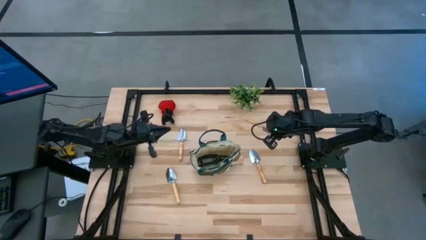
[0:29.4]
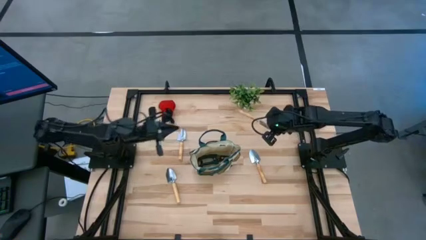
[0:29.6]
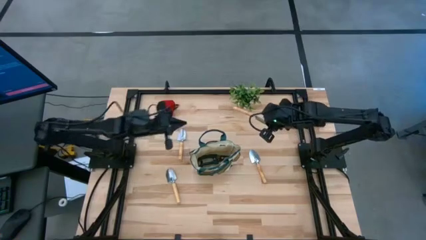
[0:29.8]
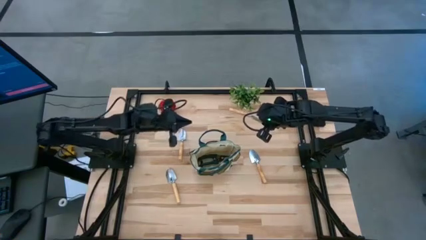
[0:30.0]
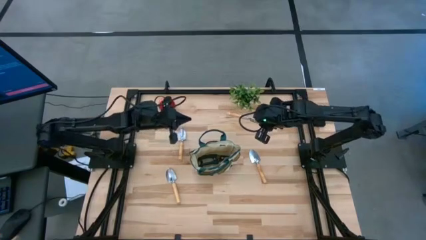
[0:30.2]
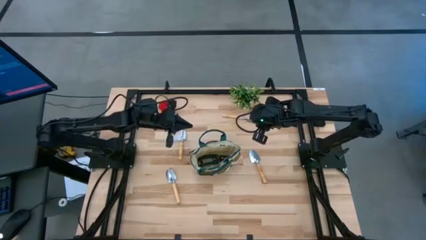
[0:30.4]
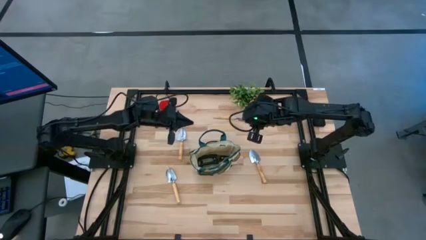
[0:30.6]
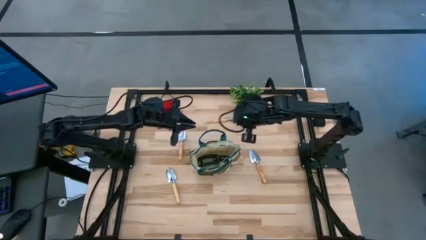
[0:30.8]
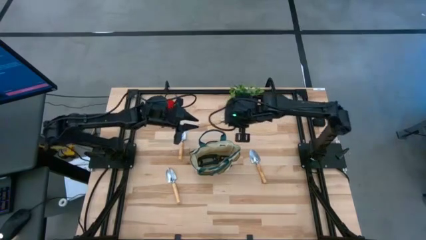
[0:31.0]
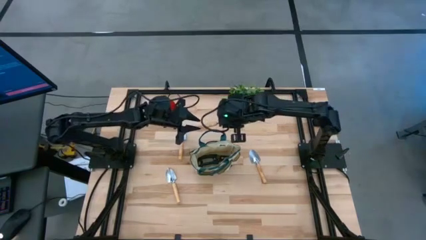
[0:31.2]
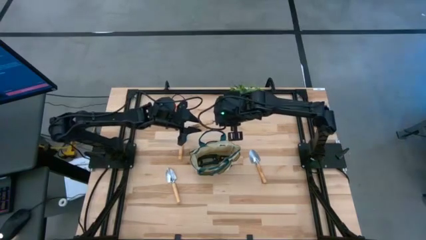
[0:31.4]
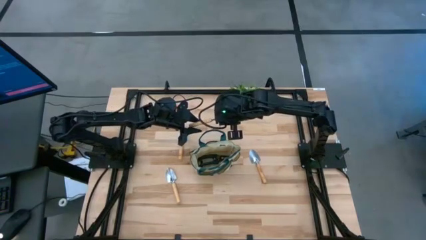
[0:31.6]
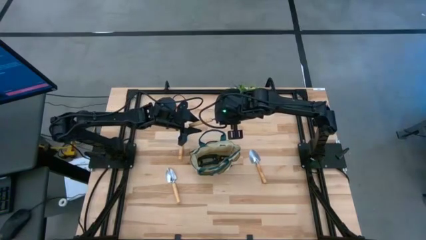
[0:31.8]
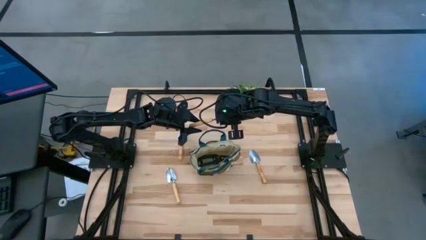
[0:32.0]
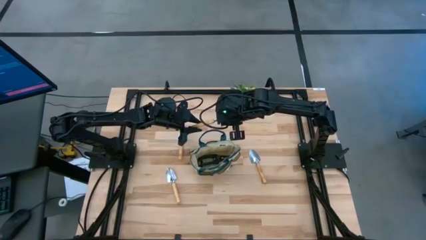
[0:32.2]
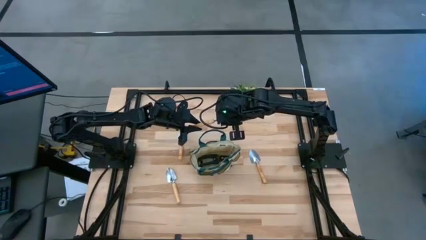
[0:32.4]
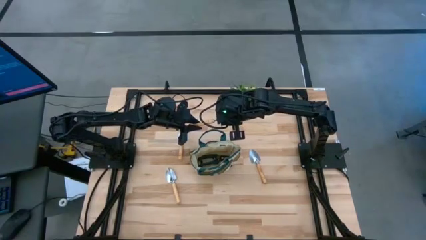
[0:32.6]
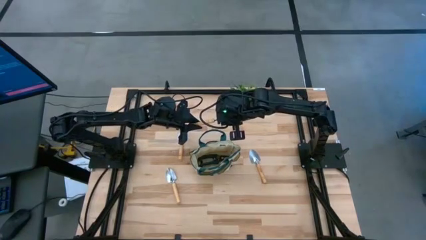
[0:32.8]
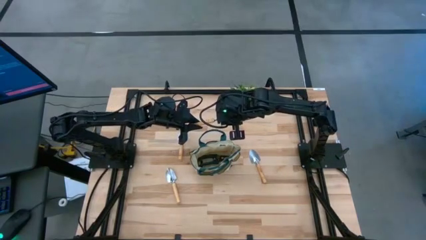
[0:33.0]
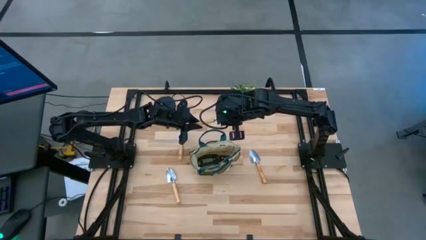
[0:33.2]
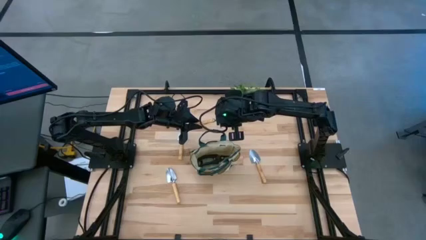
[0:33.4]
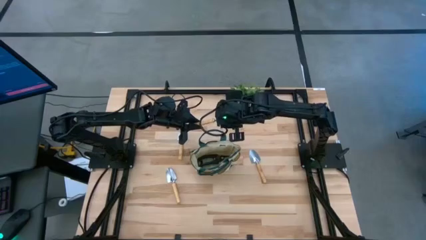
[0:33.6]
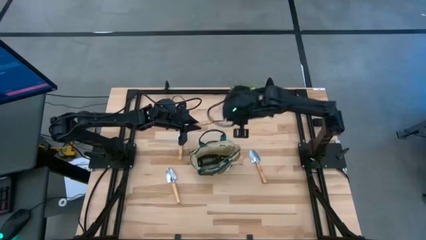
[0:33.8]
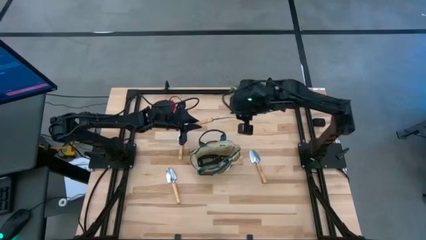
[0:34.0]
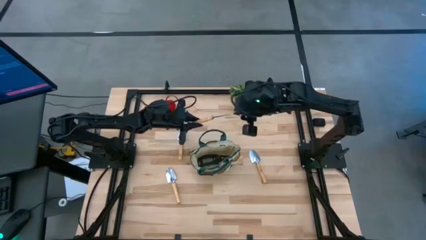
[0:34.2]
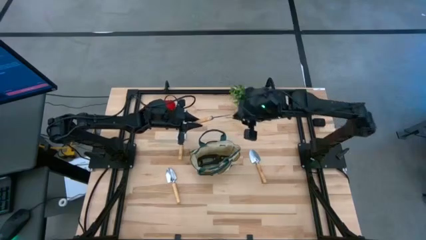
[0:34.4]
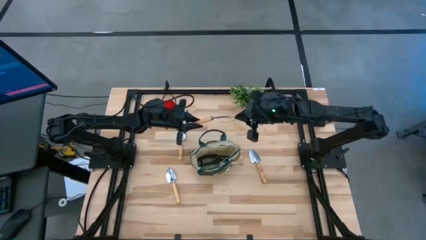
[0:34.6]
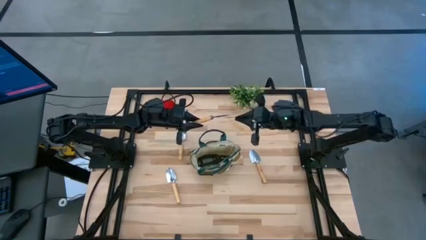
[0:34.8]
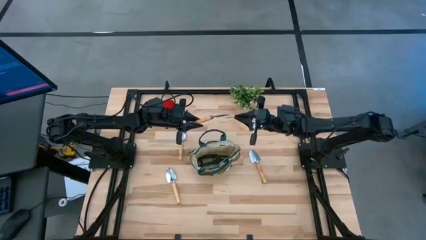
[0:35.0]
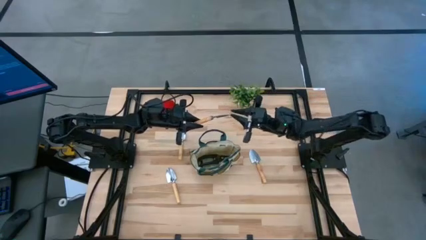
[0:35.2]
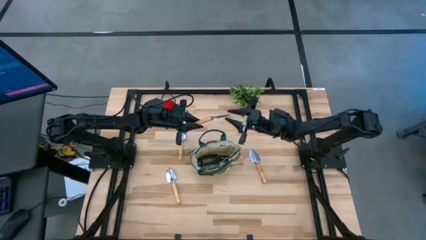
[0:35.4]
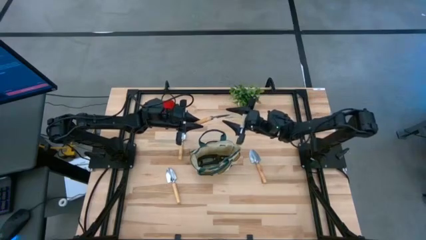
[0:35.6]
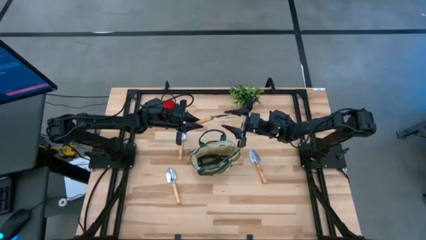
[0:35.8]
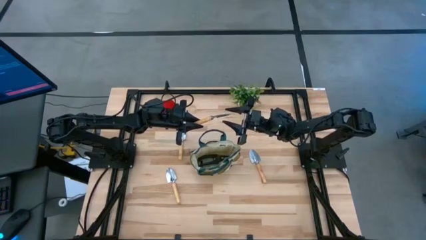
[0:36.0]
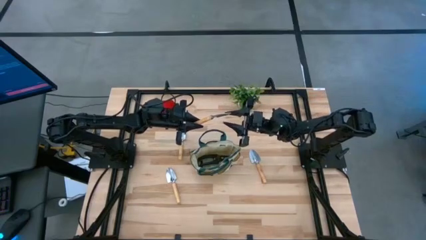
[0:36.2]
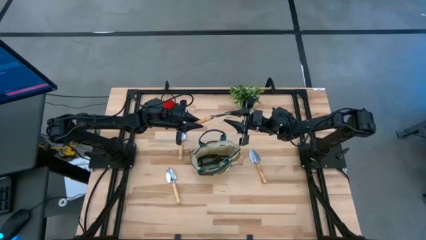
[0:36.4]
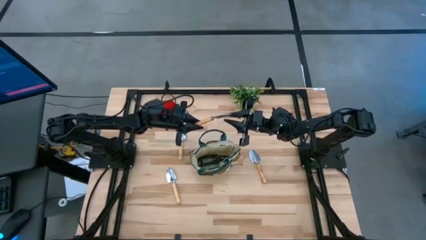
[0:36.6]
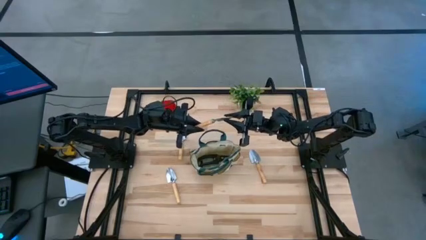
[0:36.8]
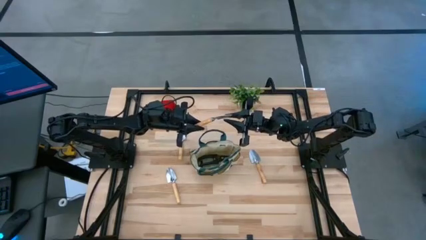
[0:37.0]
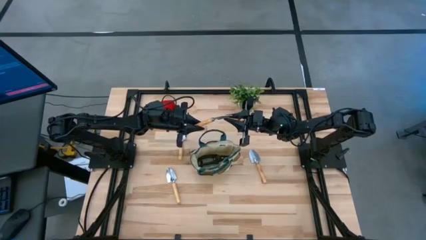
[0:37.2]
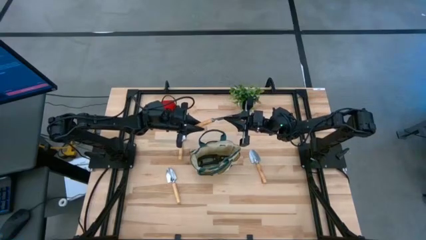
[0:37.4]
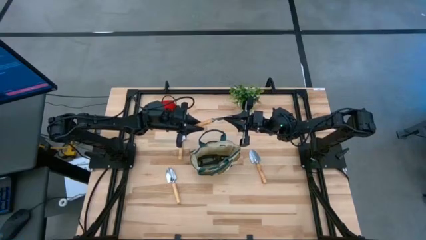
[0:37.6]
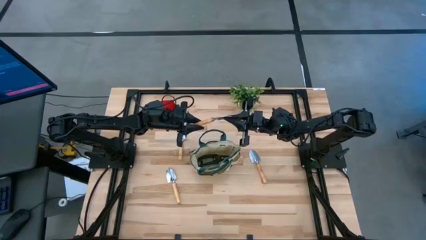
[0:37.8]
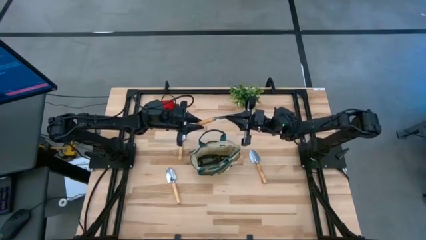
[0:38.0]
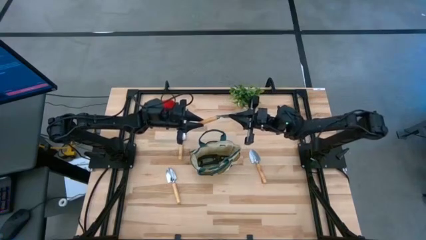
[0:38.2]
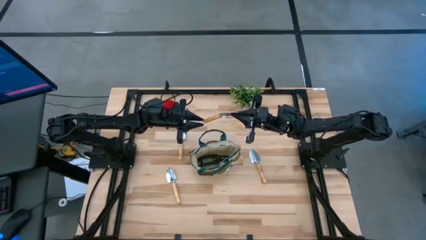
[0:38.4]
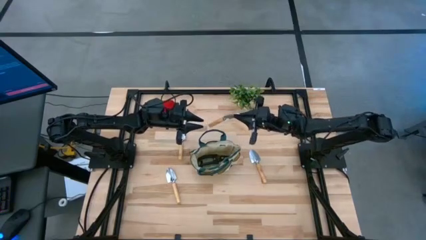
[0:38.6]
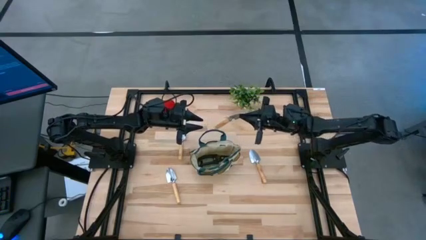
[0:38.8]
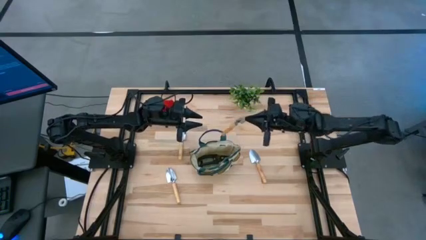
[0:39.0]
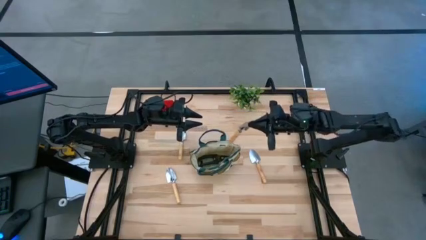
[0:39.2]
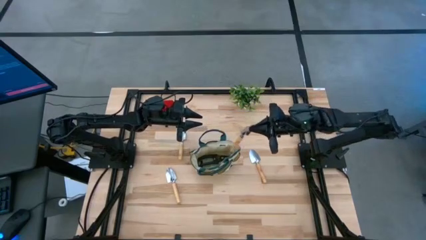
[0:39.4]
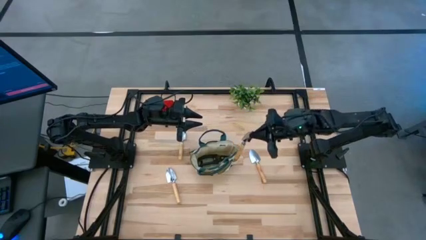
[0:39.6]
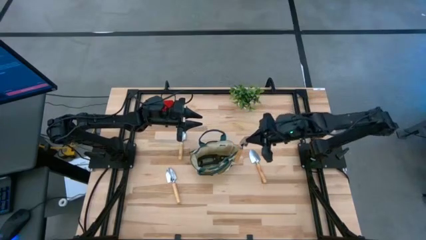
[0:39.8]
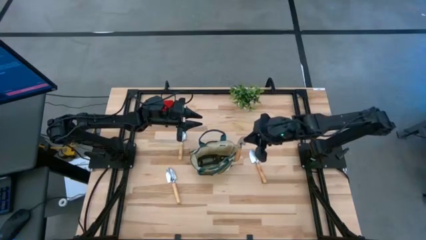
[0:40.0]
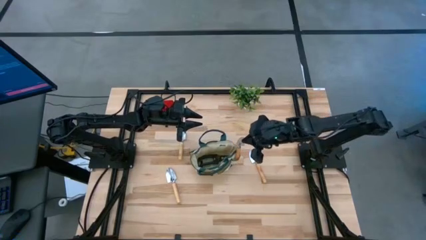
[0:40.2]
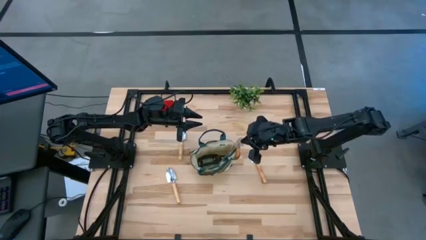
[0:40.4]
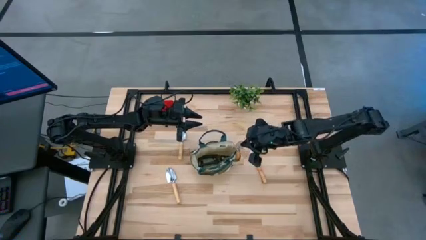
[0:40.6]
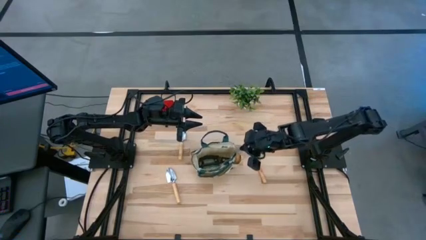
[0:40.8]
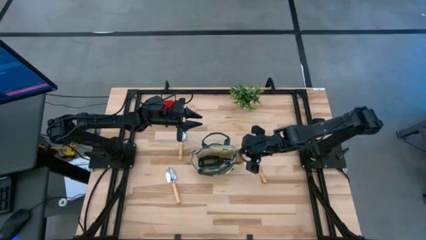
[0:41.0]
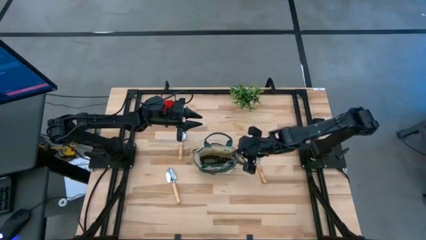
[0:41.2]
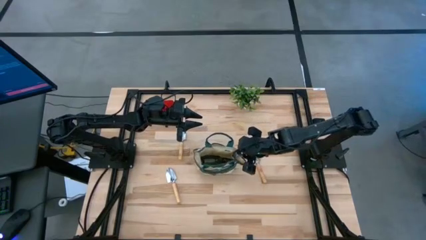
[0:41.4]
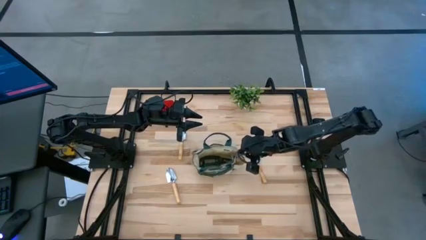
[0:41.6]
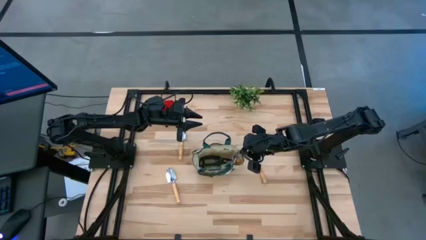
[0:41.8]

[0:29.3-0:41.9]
Task: Pick & Place Garden tools in Gardening bag
Put the brown trowel into the gardening bag
